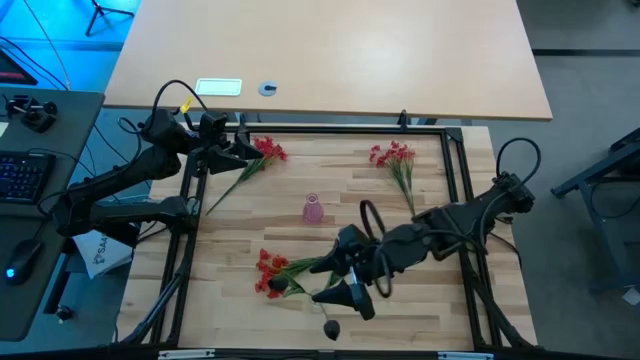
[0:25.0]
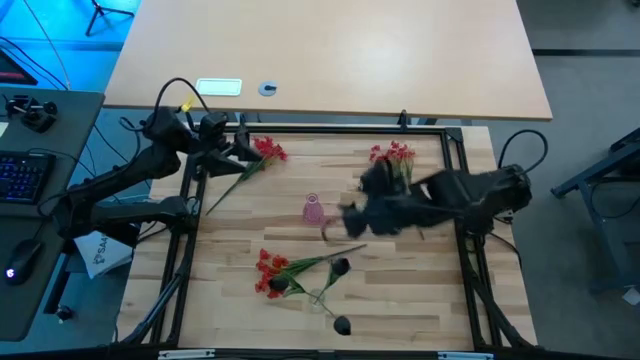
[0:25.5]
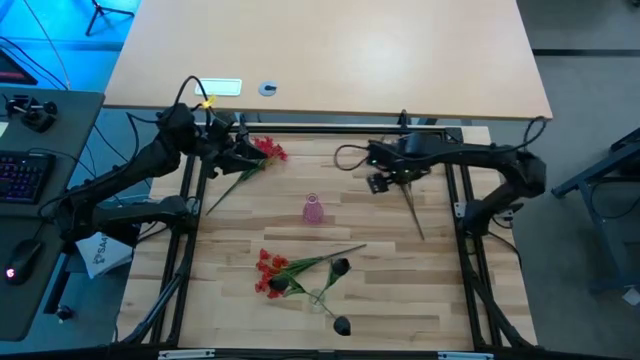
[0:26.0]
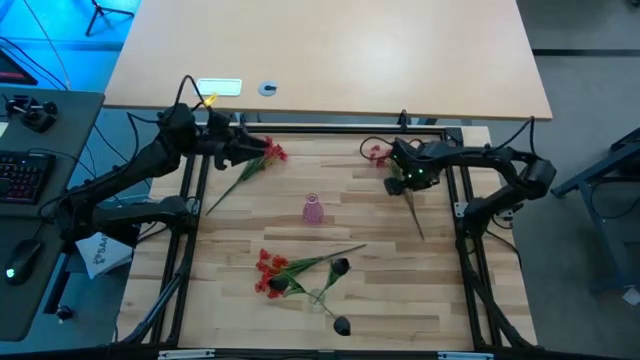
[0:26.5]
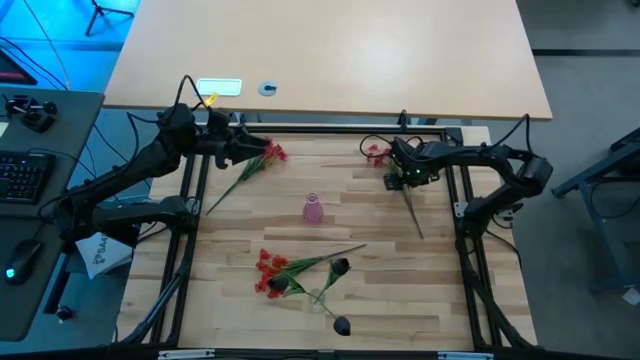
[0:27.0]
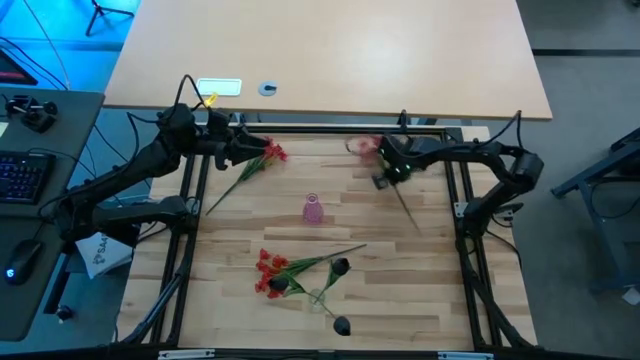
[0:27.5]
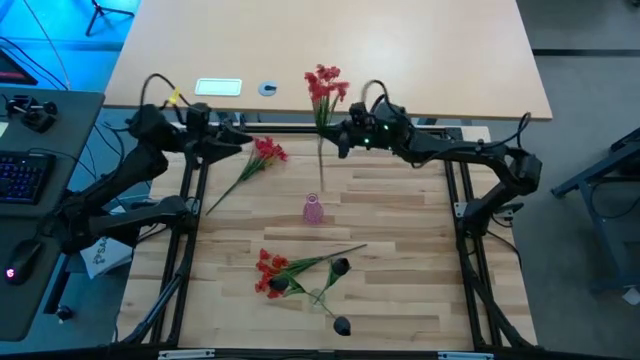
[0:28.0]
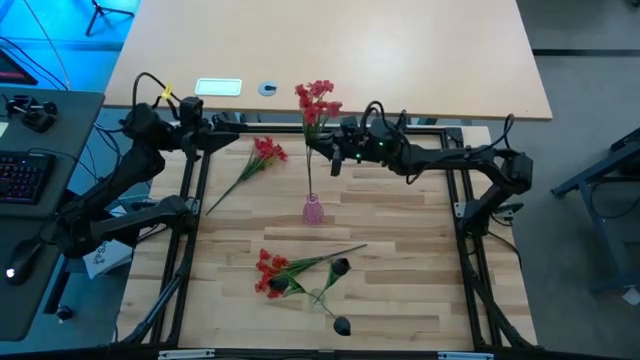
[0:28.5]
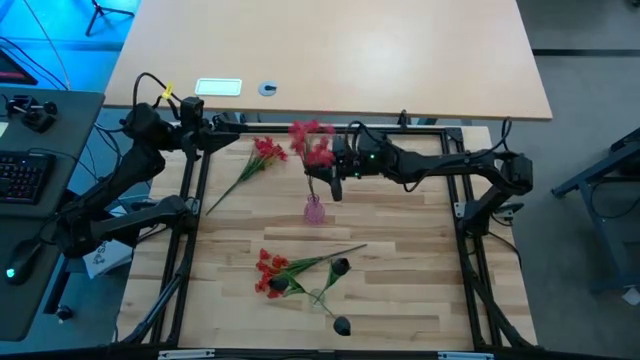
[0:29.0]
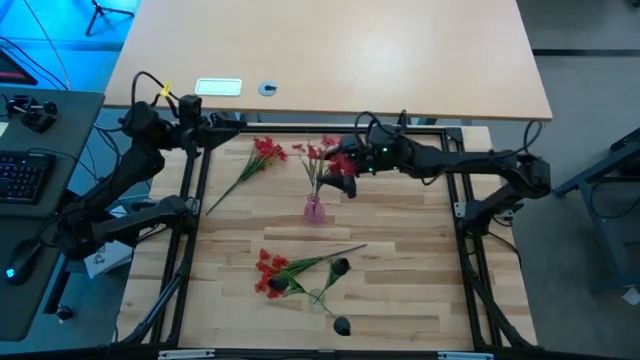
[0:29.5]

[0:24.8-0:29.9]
Task: Sort flowers into vase by color
Put the top right red flowers into the pink vase

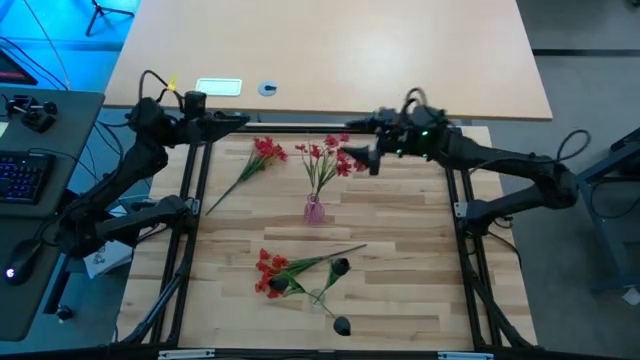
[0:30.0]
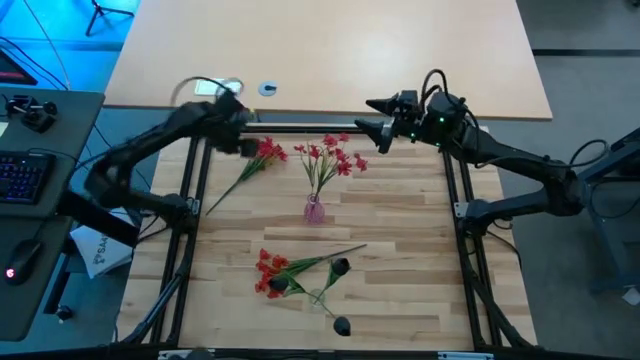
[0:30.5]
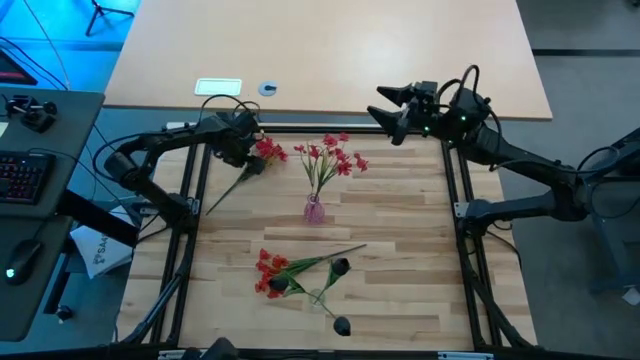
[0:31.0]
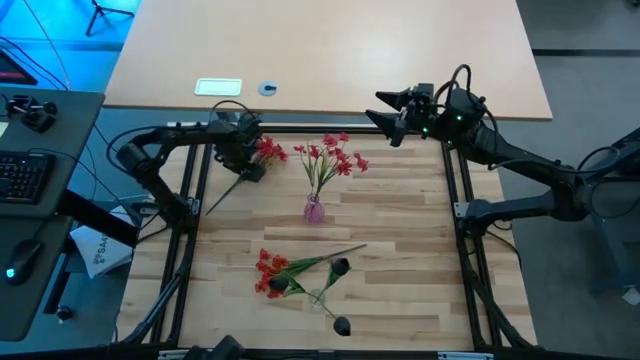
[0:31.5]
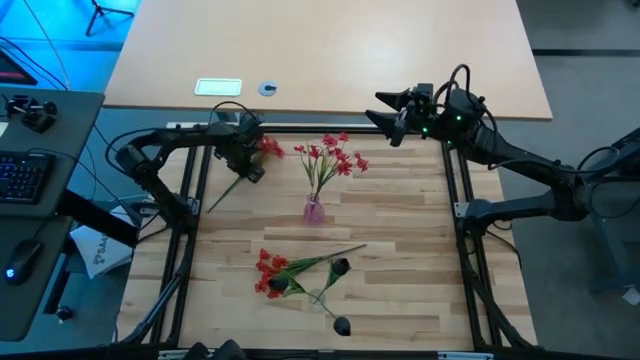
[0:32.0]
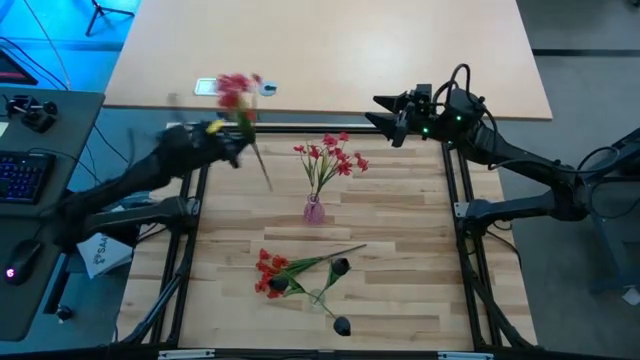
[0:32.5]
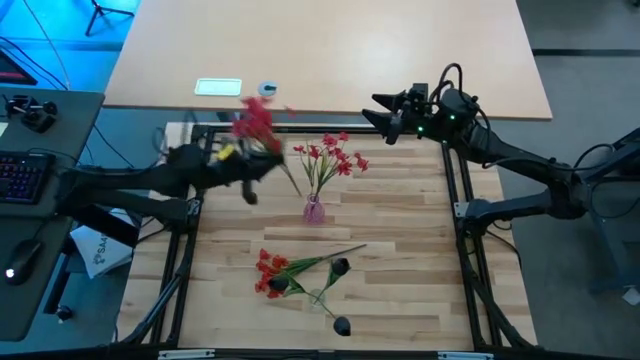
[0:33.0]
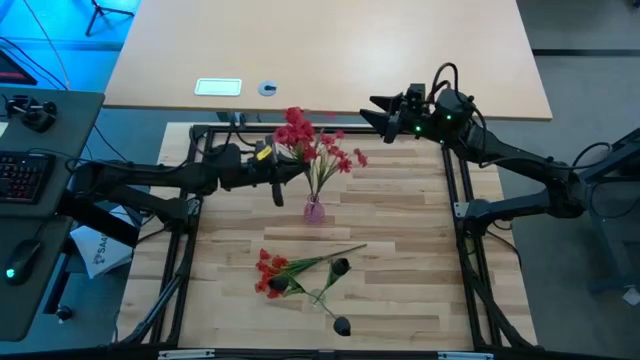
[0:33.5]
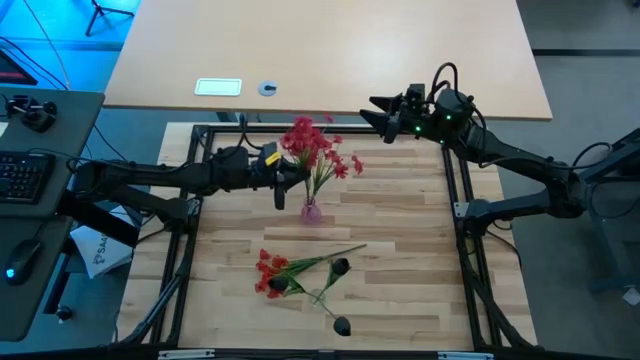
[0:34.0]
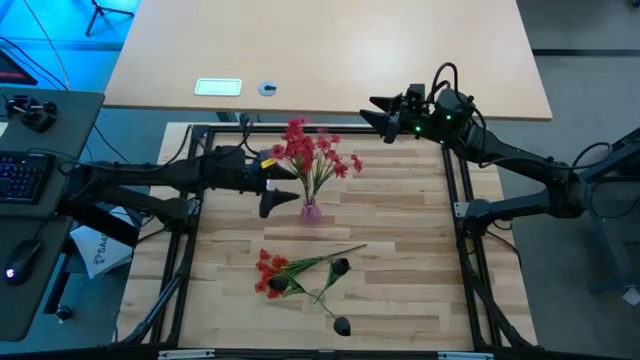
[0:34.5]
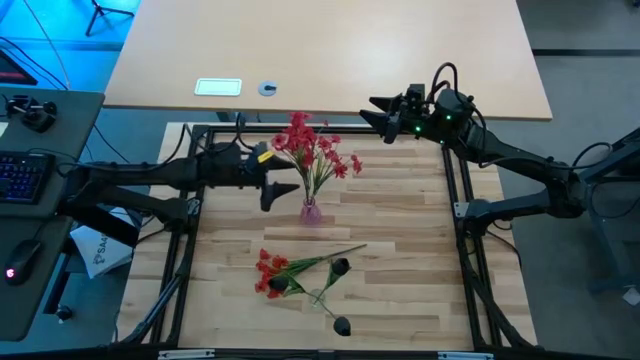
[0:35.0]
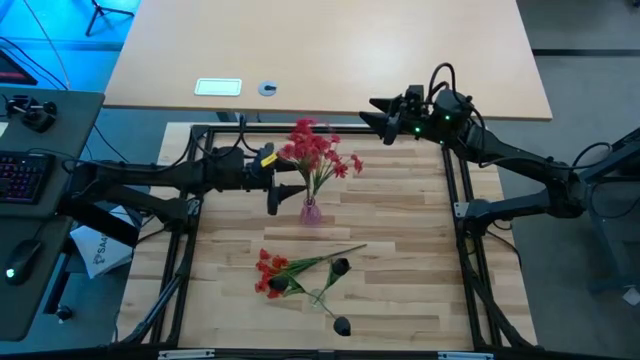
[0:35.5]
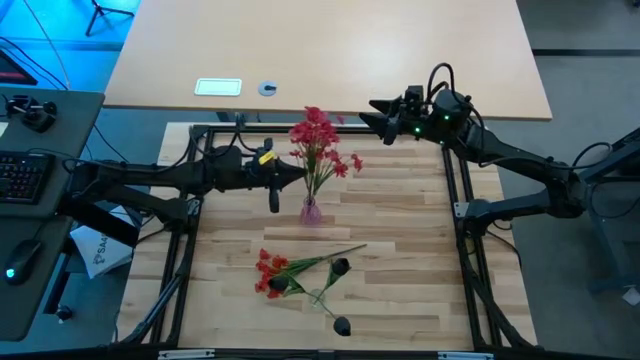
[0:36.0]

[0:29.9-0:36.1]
Put the top red flowers into the pink vase

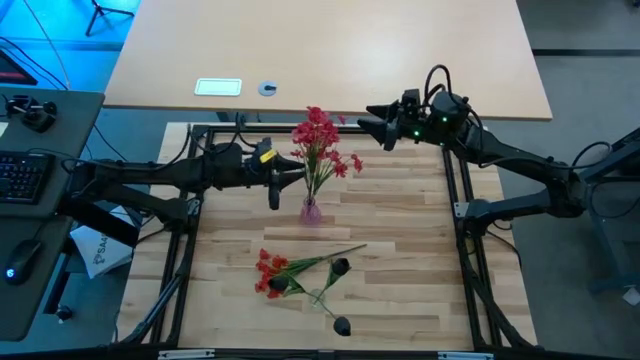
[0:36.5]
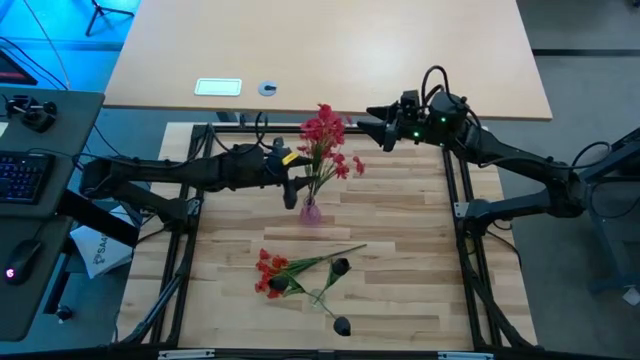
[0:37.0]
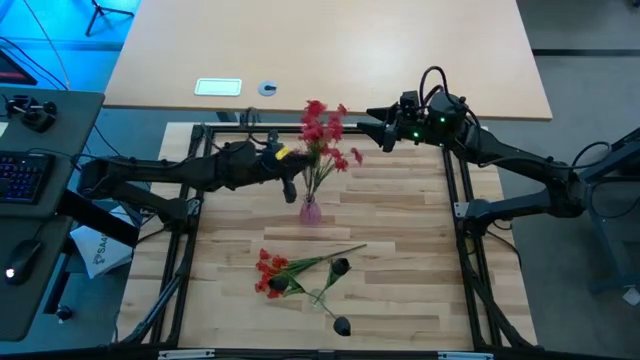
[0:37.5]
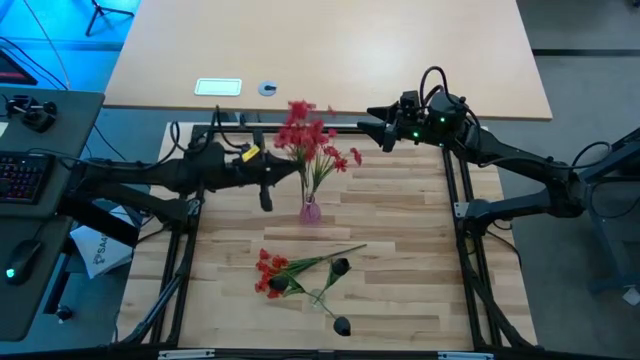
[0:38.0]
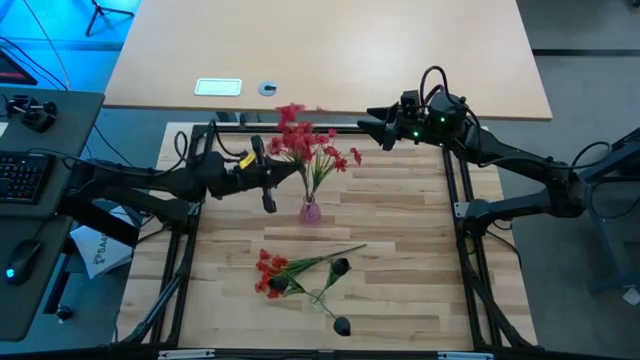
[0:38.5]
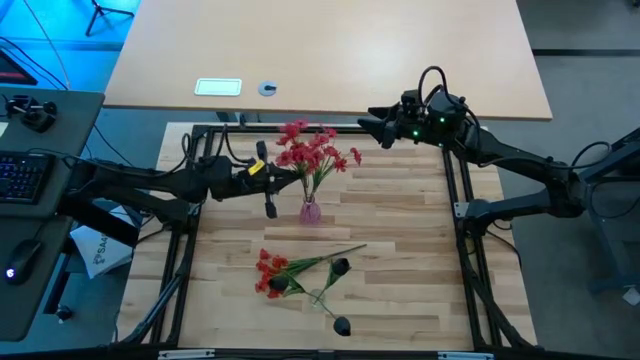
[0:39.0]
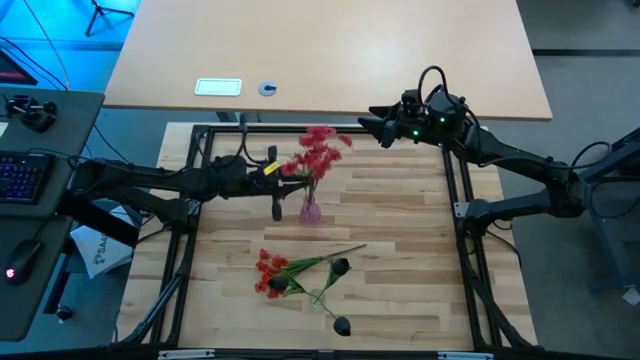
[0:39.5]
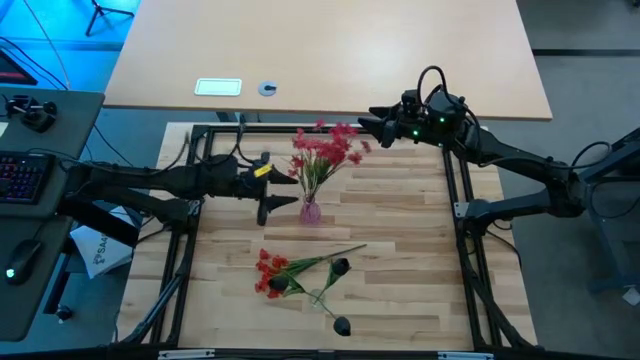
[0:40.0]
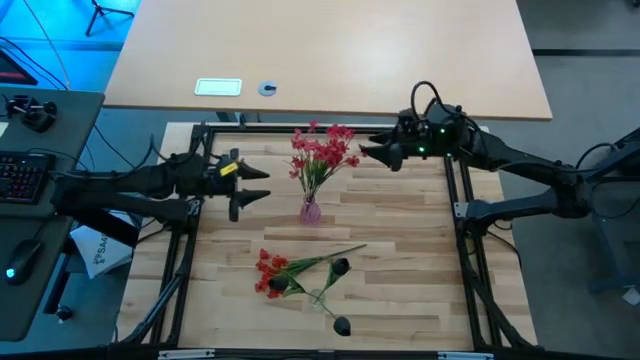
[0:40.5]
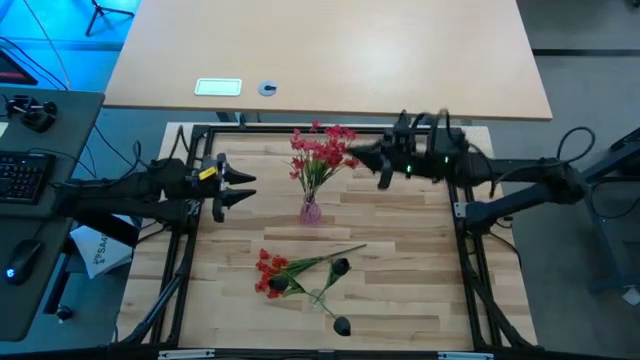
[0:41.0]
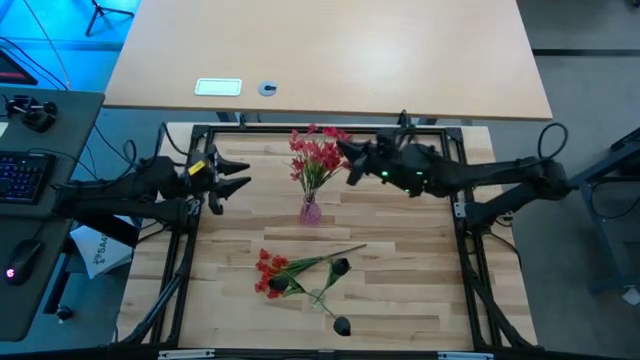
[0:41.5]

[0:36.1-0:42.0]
Put the top red flowers into the pink vase

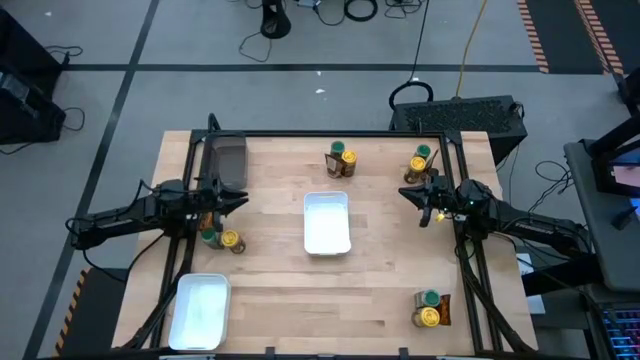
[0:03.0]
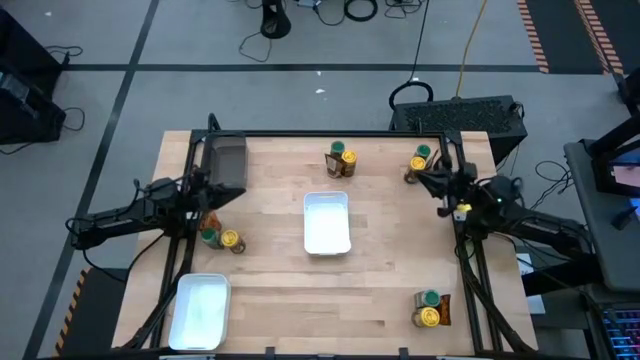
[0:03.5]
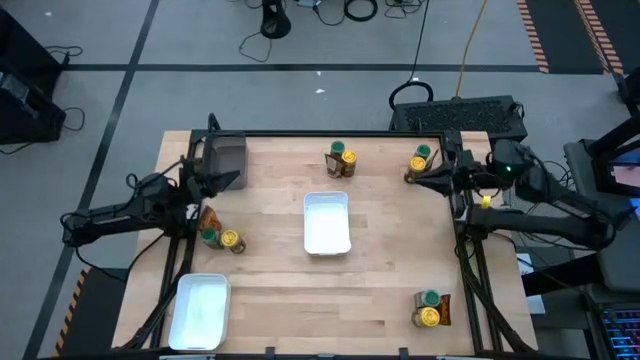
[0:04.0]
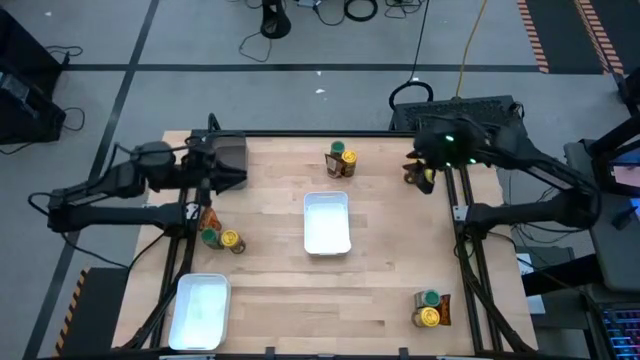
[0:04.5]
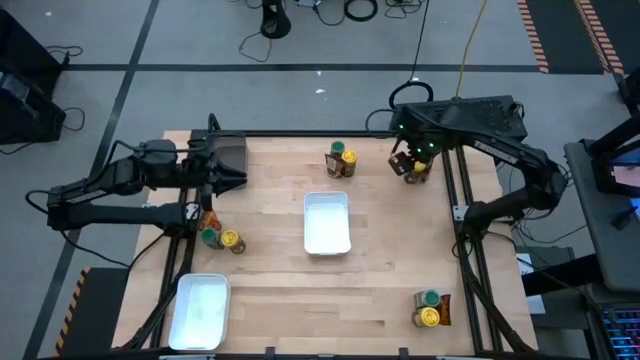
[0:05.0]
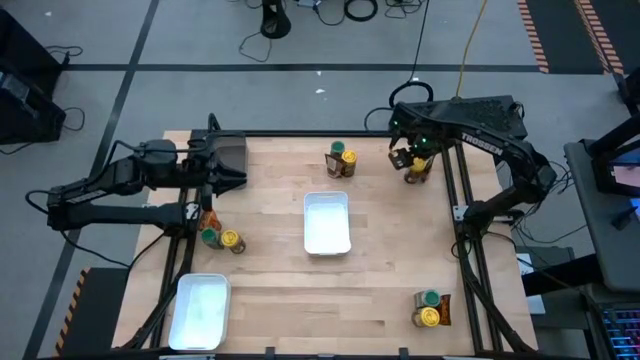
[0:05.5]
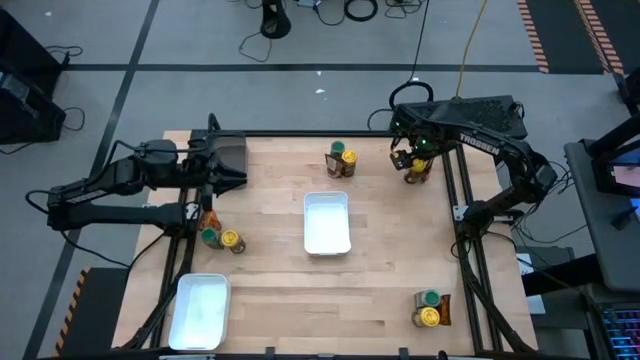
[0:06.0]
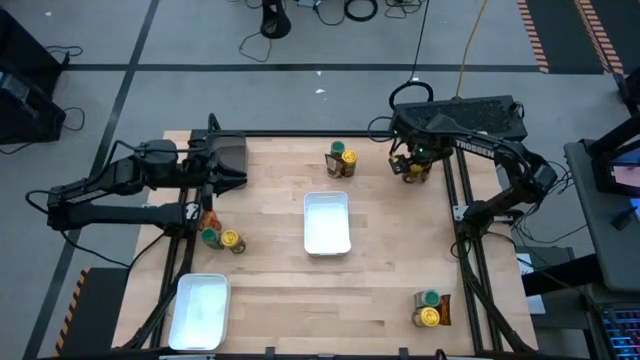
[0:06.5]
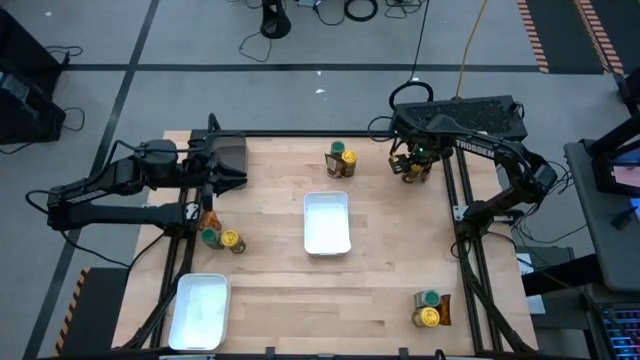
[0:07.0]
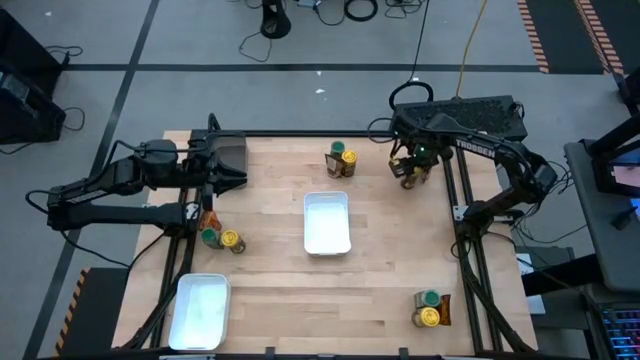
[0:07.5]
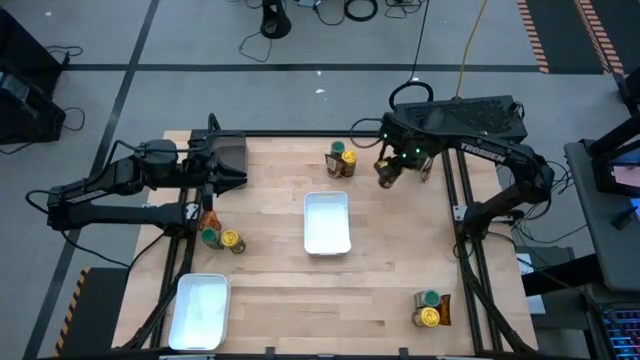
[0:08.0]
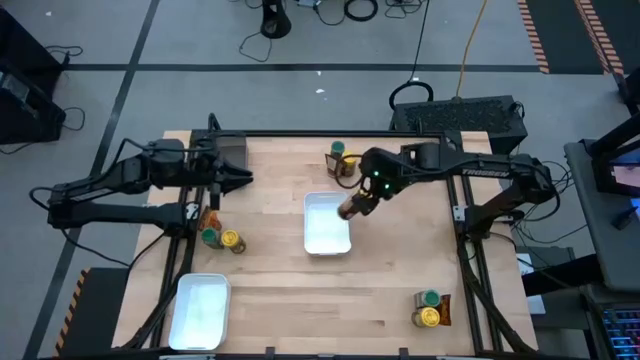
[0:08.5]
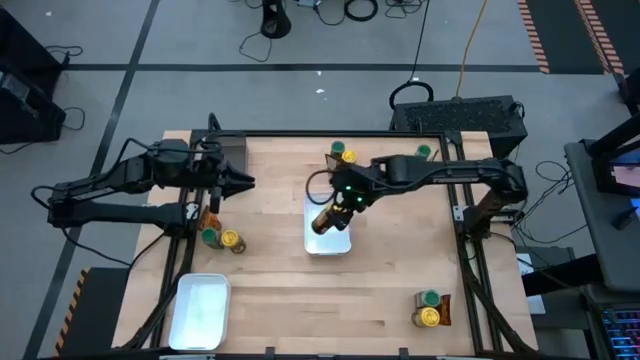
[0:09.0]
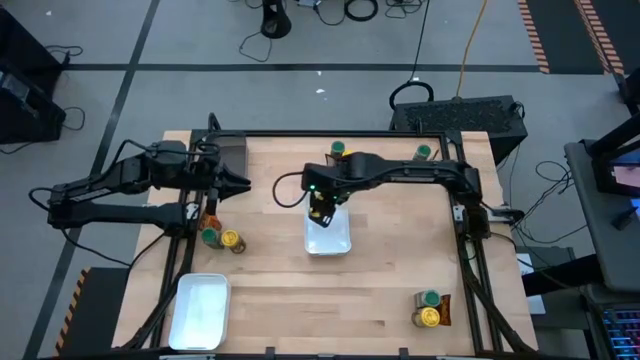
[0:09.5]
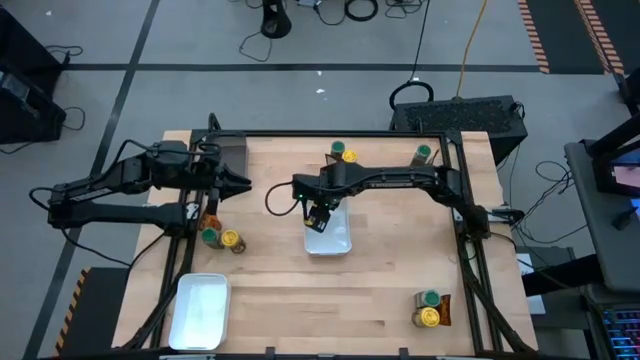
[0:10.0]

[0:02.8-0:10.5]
Task: Sort spices by type
Put the top right yellow spice bottle into the top white bin
